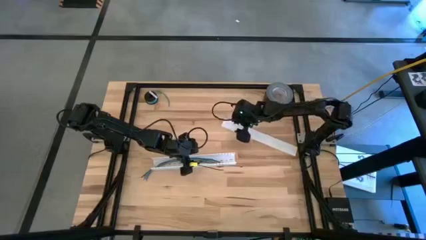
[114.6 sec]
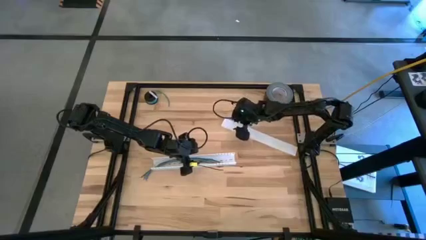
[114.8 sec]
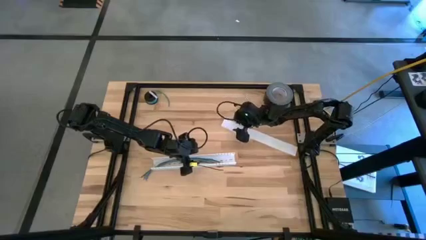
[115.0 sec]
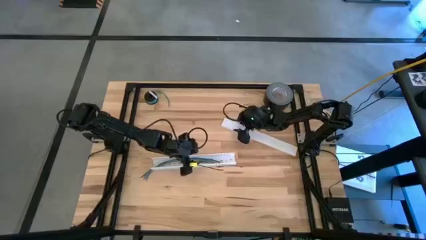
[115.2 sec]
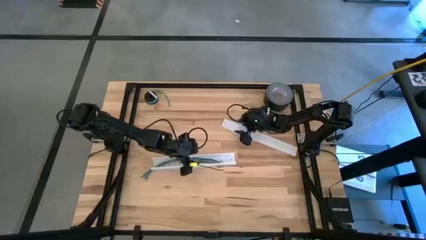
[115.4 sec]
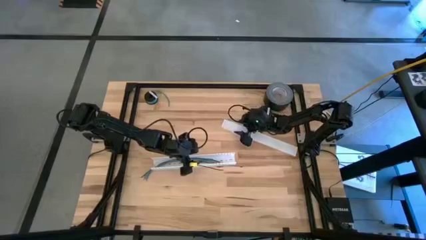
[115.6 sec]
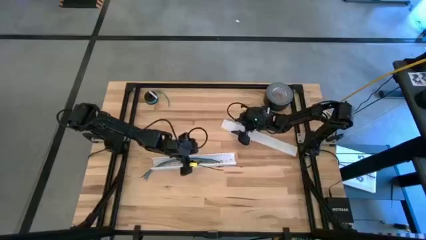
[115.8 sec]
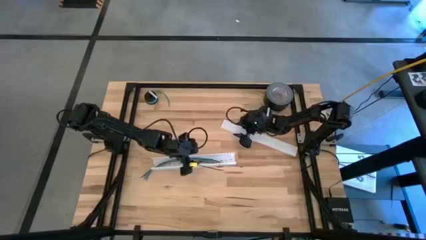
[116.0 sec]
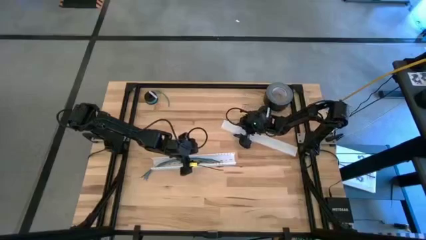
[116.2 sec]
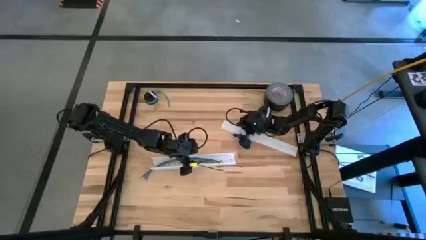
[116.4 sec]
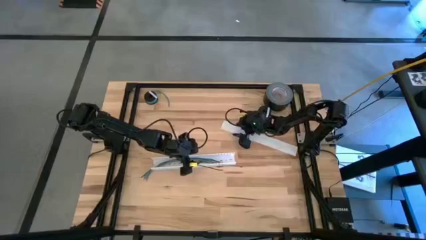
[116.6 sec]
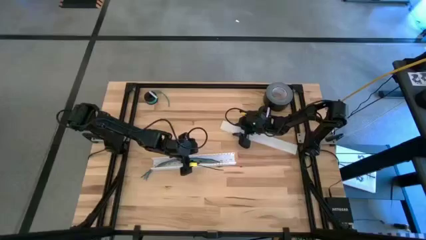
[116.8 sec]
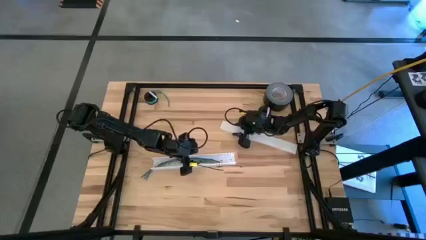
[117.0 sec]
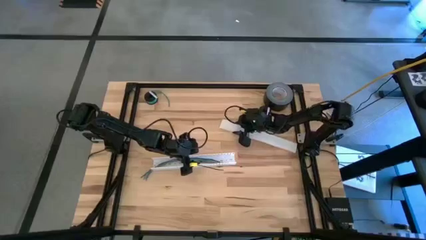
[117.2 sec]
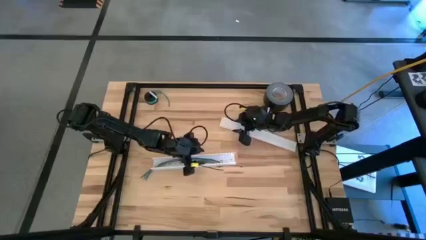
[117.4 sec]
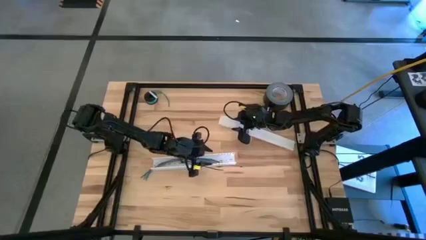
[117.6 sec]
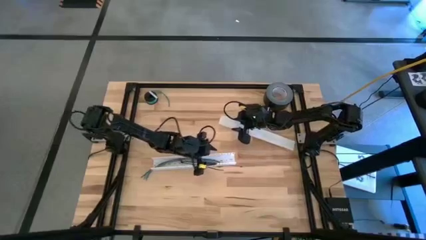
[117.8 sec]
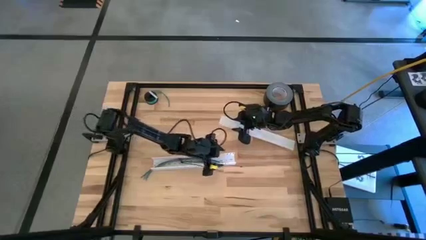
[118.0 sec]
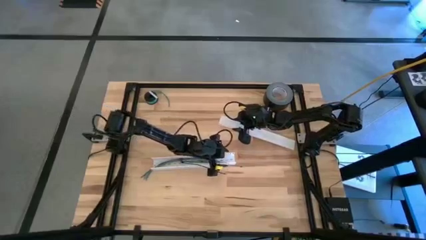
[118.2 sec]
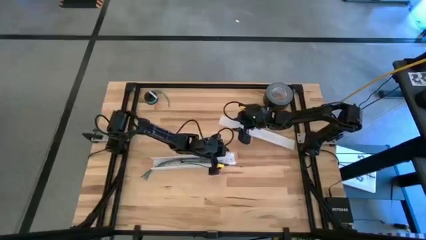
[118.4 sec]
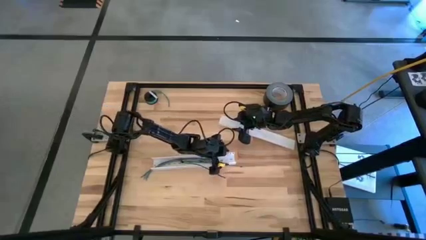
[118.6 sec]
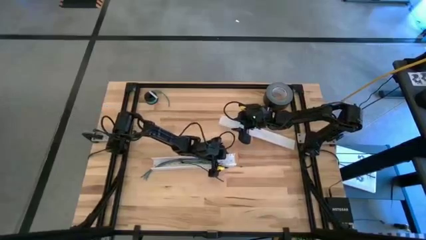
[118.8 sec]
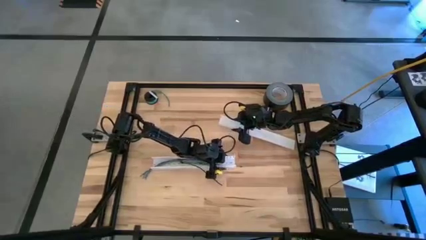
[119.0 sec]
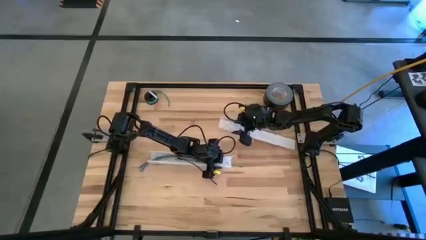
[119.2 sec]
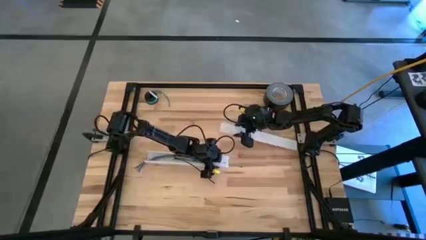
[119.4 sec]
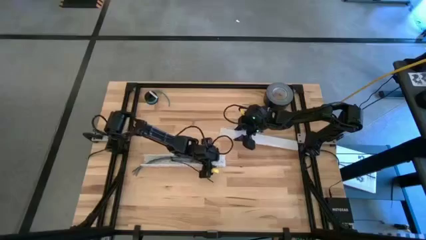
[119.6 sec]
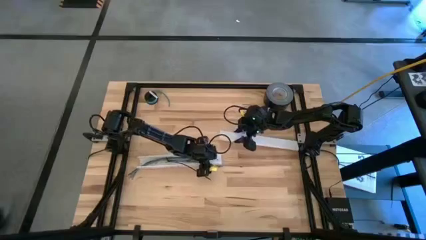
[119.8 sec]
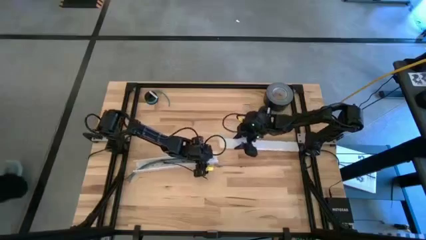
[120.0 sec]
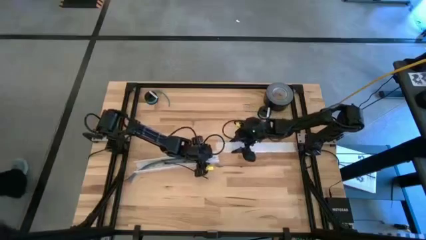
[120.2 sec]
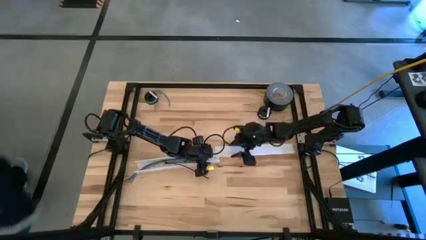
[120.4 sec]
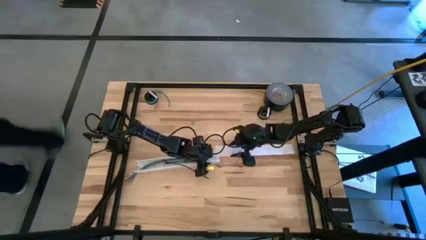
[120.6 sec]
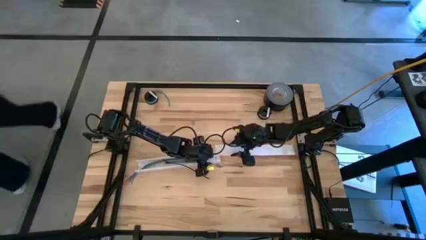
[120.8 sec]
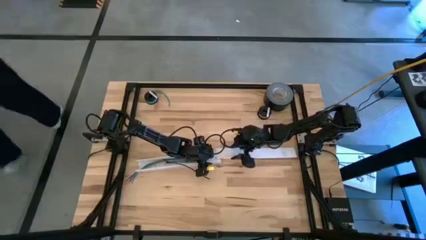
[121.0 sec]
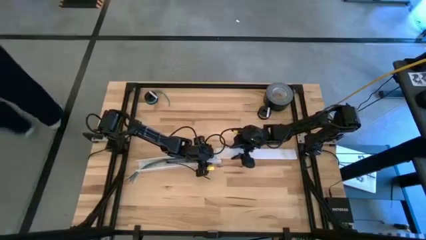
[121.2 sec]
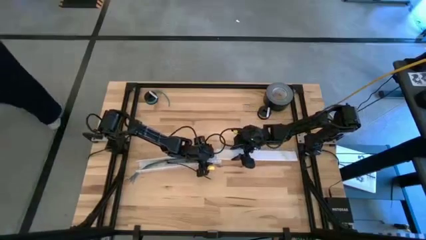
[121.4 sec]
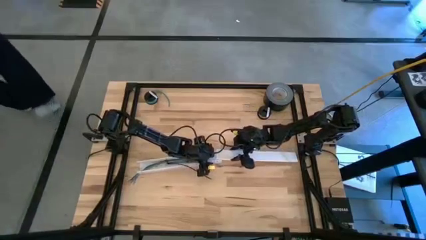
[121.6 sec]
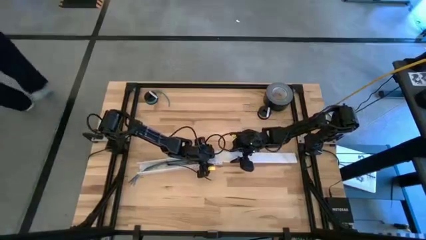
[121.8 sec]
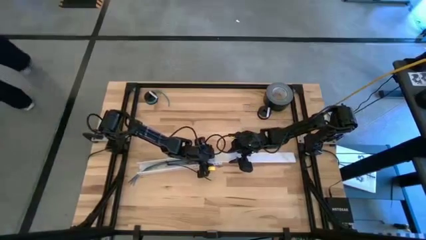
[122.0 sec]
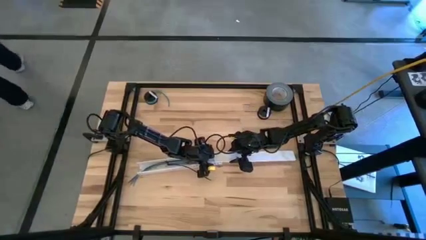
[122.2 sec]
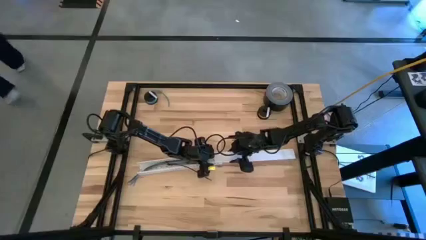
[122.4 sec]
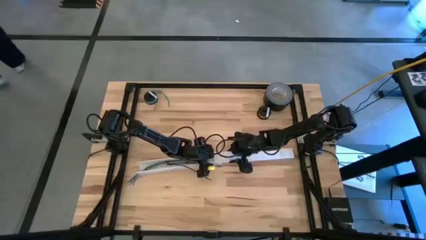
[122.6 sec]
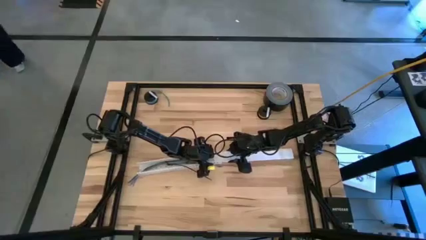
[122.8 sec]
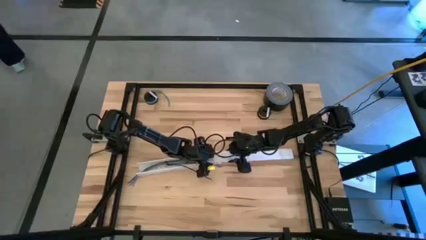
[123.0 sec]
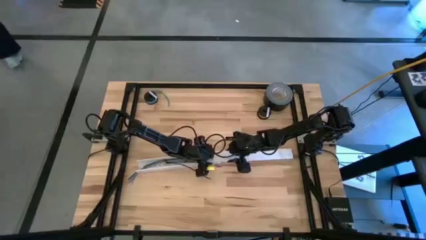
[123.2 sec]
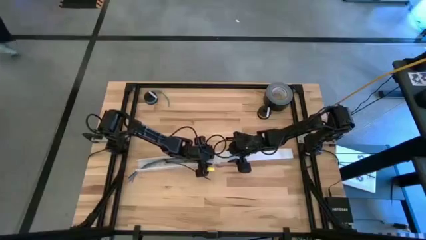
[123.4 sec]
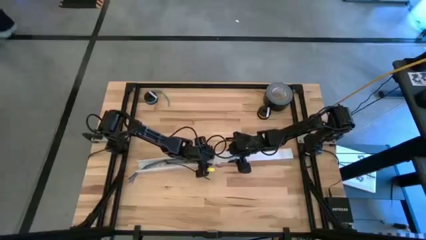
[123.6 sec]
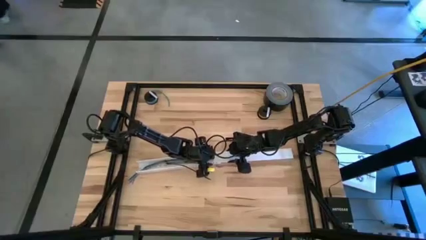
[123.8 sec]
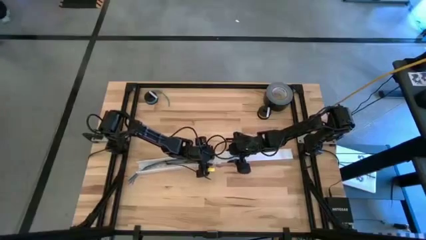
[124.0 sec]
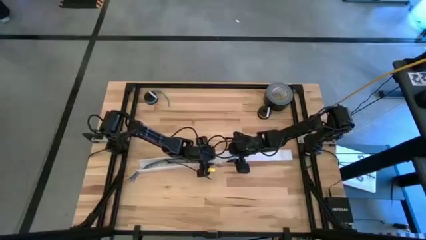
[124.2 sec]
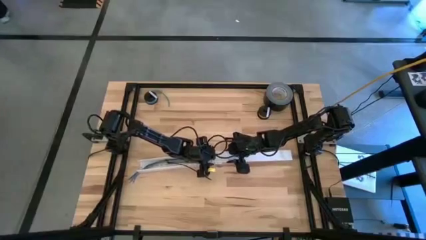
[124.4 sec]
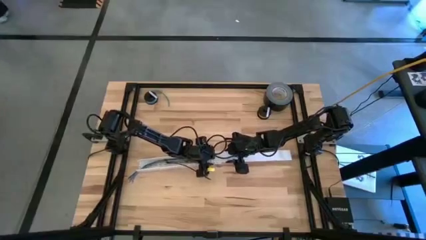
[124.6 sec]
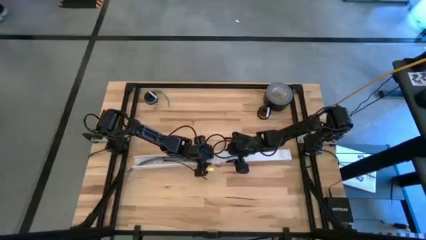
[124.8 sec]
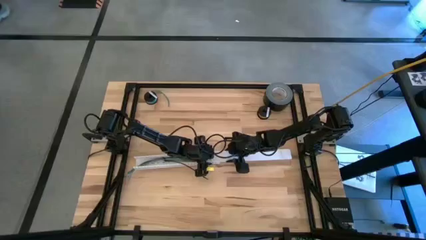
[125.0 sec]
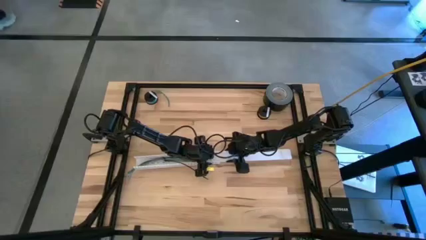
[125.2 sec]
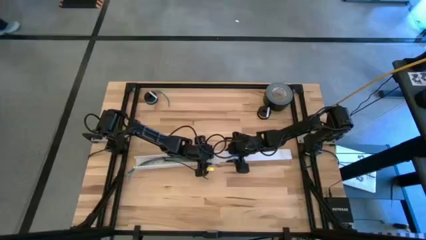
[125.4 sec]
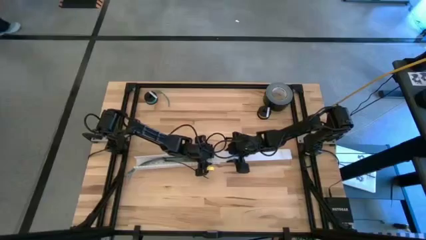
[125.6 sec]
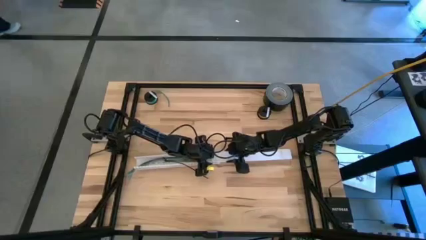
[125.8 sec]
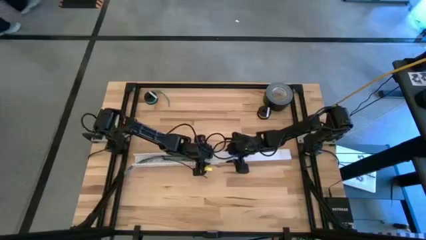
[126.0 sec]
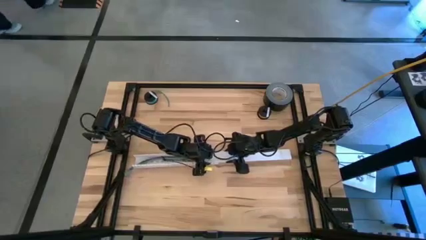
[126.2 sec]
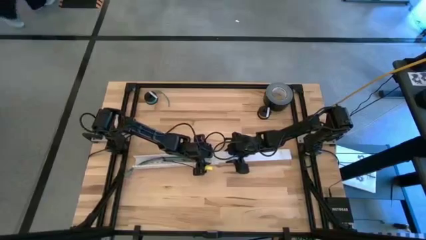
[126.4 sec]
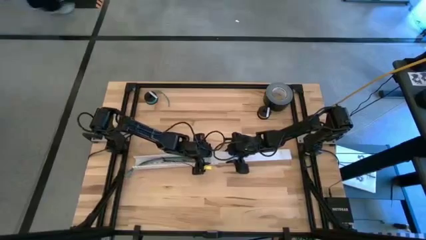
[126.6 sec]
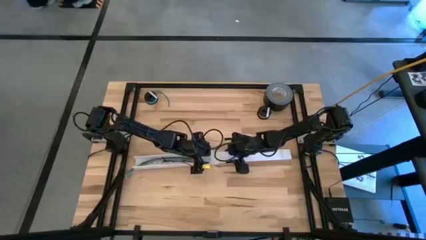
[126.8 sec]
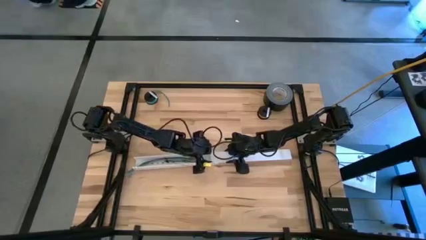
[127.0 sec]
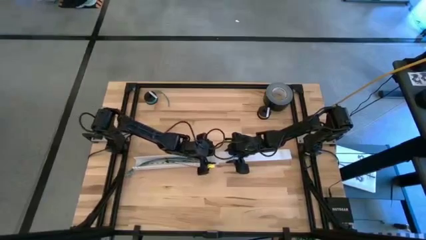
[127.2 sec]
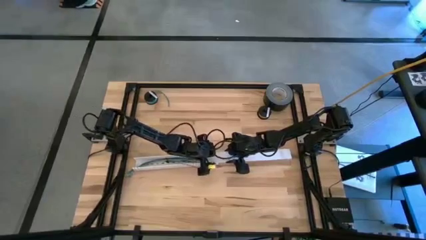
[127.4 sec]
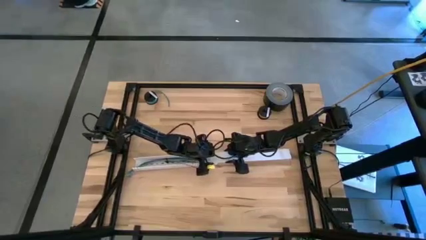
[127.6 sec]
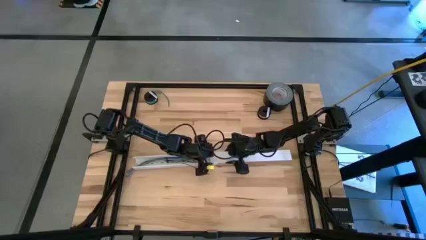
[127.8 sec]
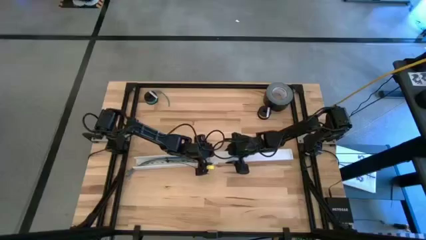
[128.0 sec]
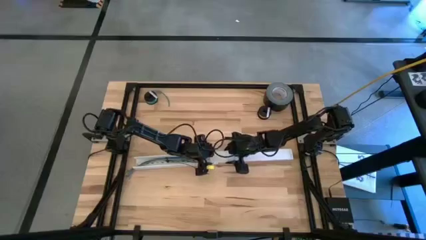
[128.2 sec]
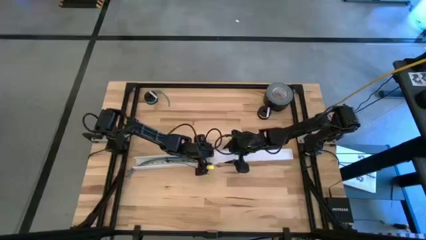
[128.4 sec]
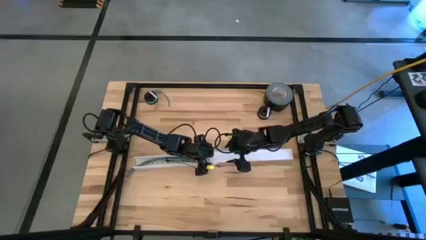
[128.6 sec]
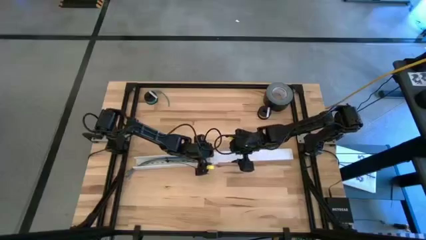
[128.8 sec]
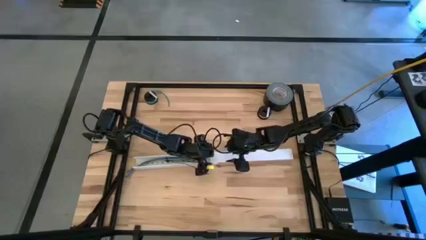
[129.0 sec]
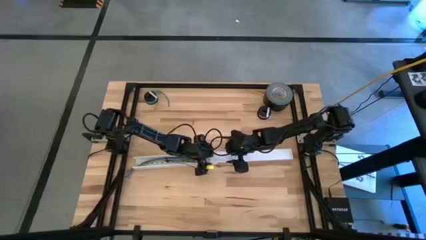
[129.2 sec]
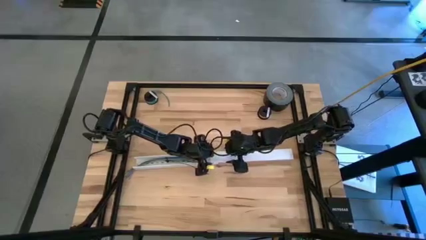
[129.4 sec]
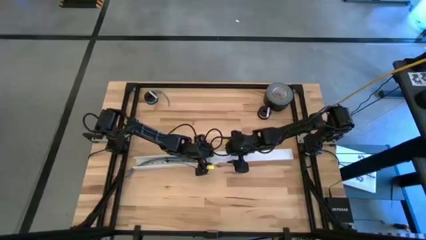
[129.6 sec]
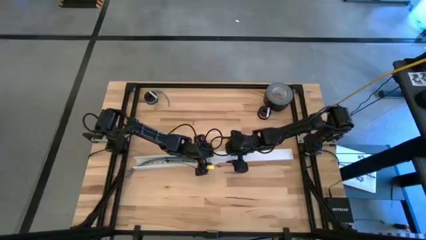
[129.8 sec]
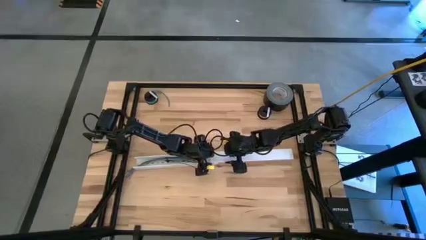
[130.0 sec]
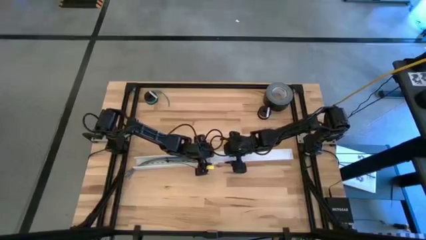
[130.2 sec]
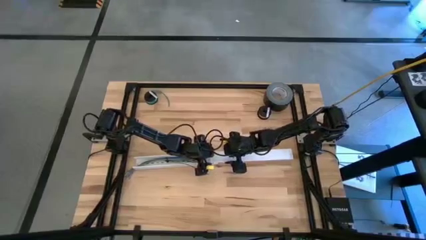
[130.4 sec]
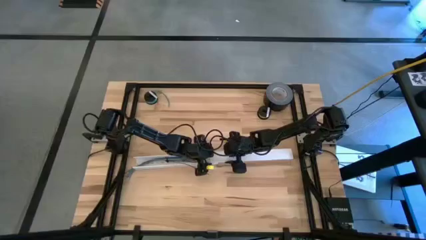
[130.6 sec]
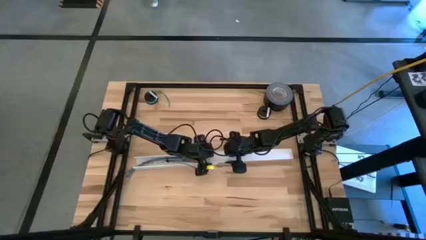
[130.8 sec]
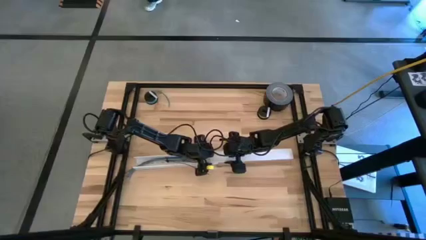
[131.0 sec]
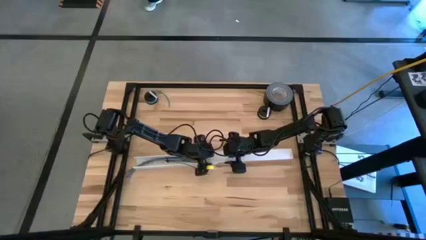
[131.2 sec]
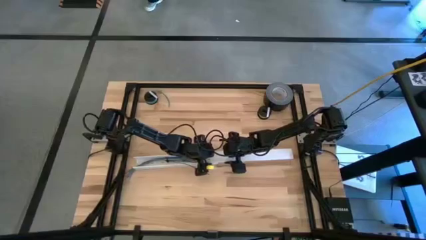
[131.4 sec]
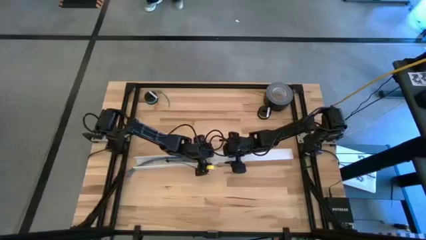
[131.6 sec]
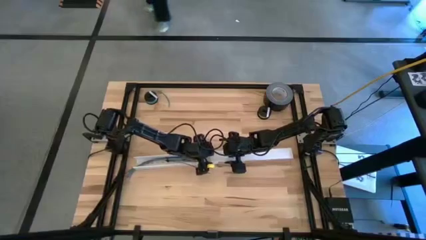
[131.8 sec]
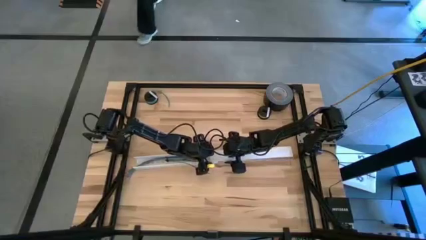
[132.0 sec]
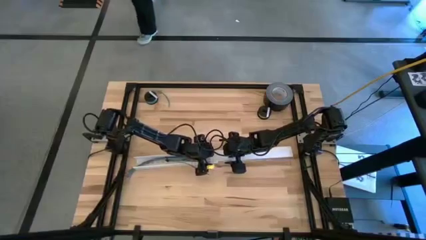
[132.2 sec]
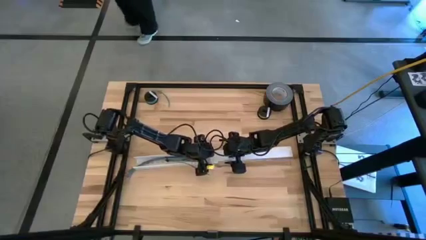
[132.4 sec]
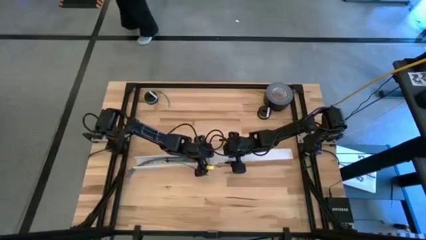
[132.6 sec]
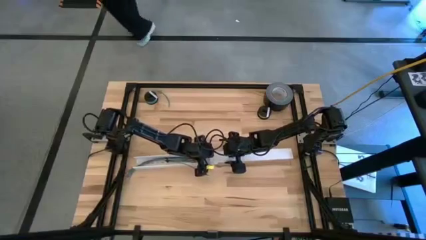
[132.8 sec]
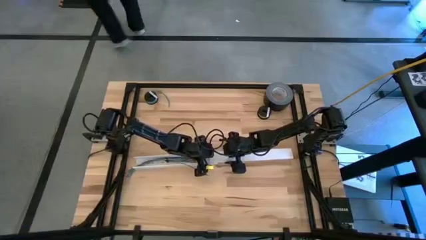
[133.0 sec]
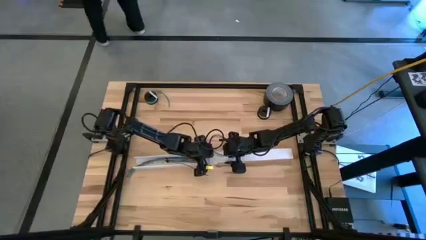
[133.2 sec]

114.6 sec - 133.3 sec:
Task: Ziptie cables
Close the white cable duct
